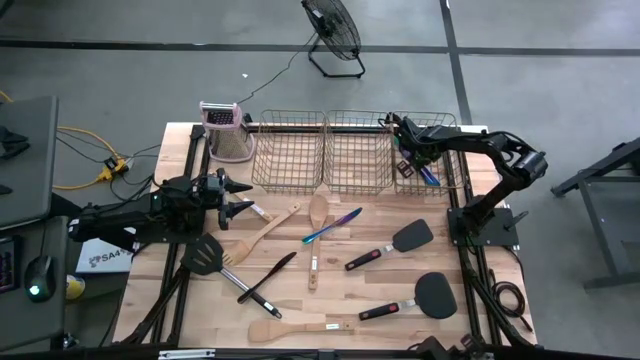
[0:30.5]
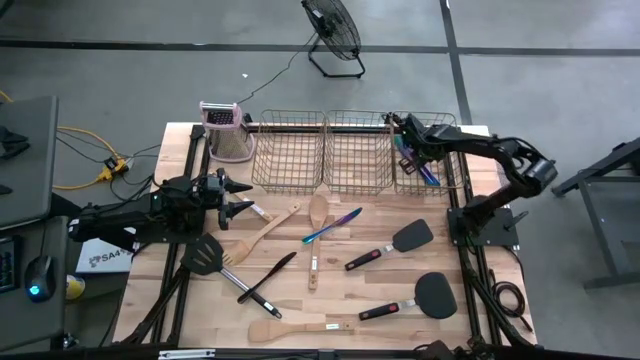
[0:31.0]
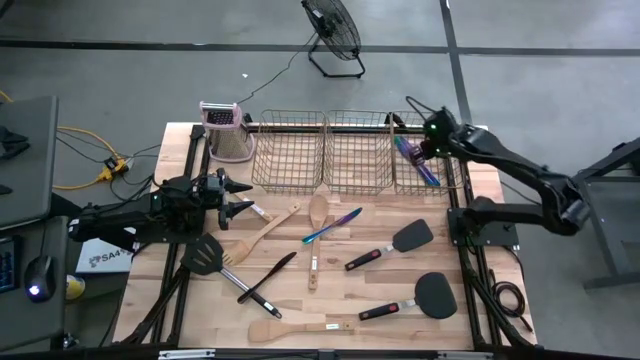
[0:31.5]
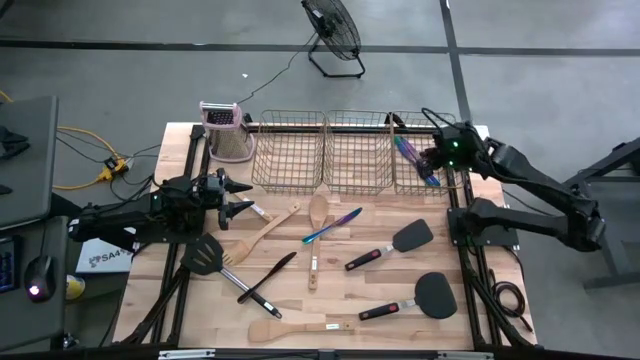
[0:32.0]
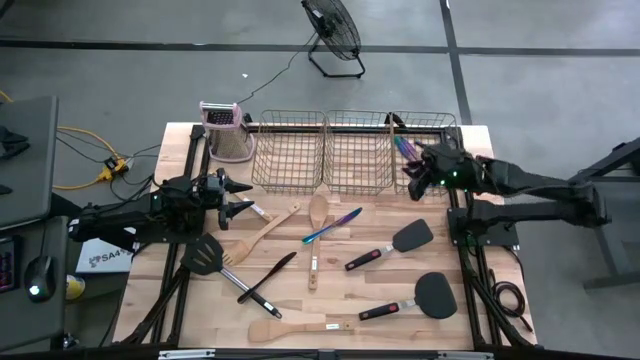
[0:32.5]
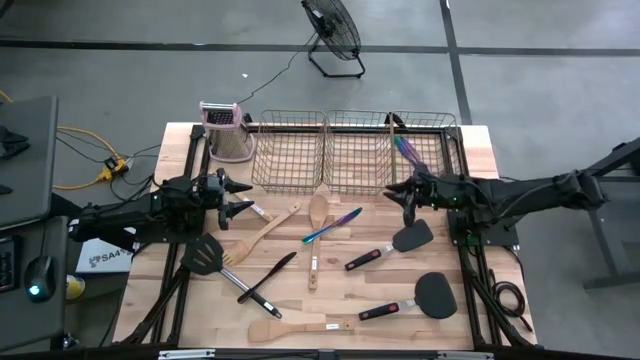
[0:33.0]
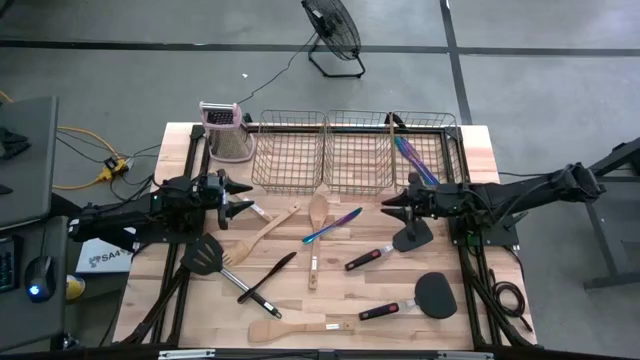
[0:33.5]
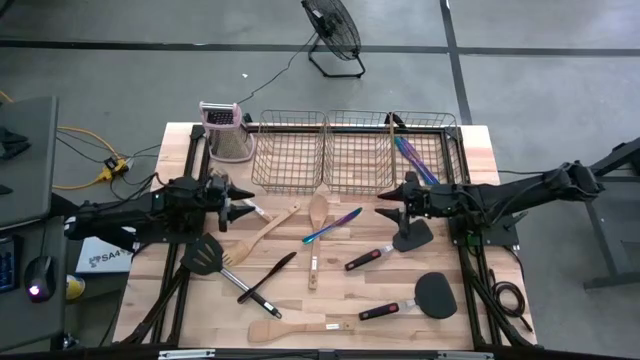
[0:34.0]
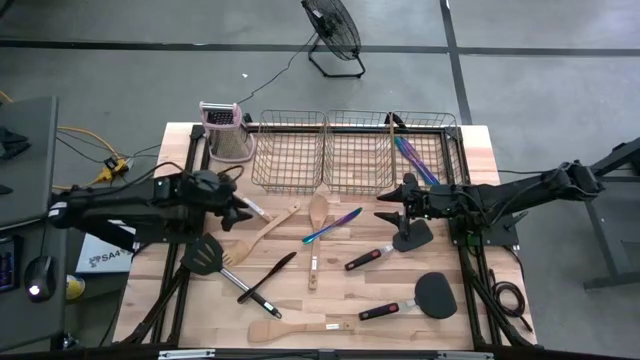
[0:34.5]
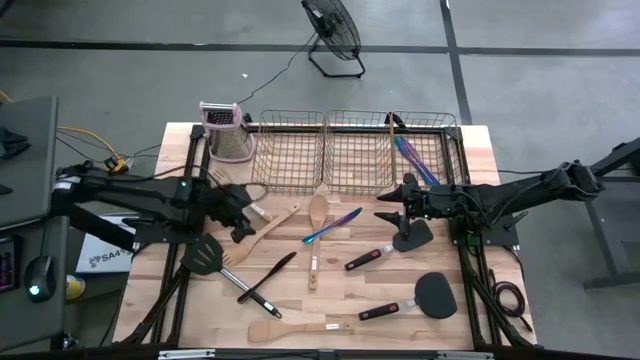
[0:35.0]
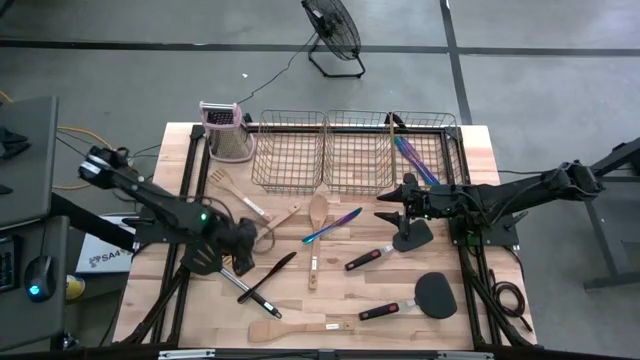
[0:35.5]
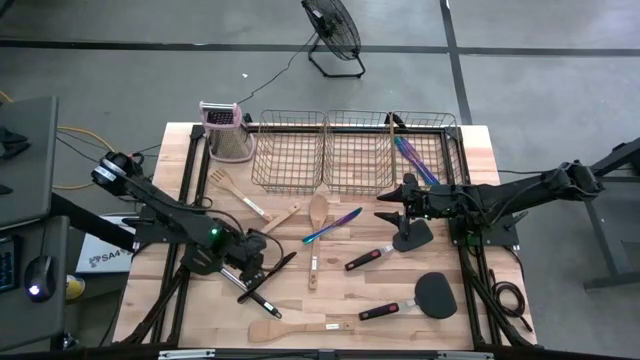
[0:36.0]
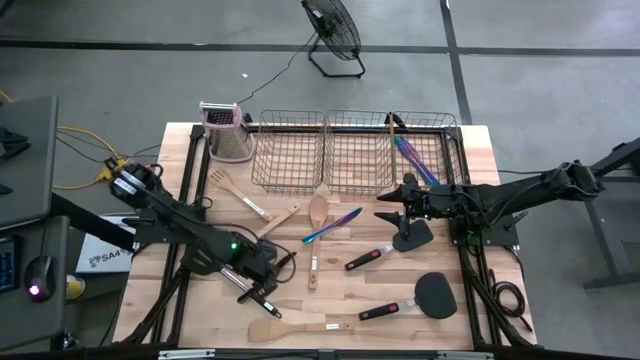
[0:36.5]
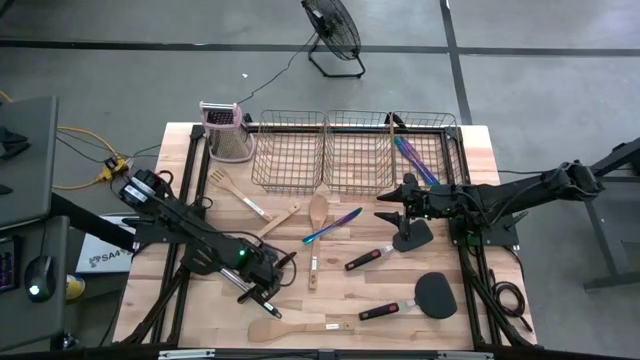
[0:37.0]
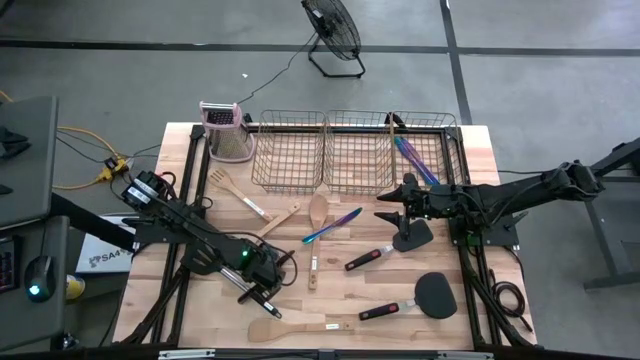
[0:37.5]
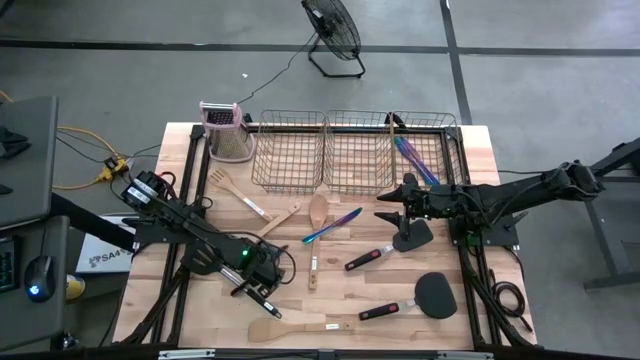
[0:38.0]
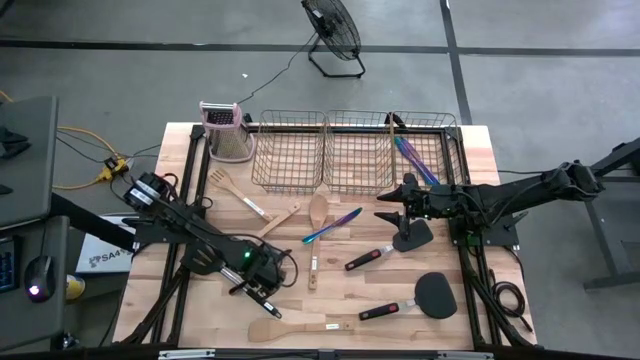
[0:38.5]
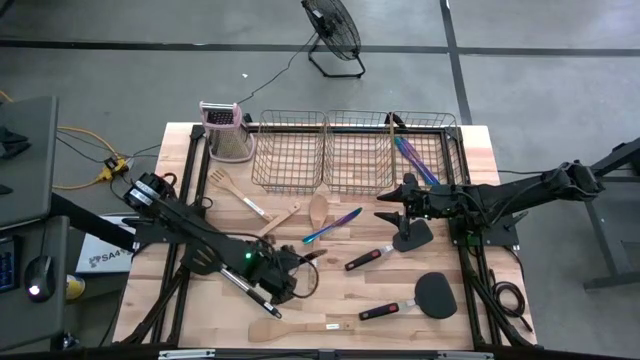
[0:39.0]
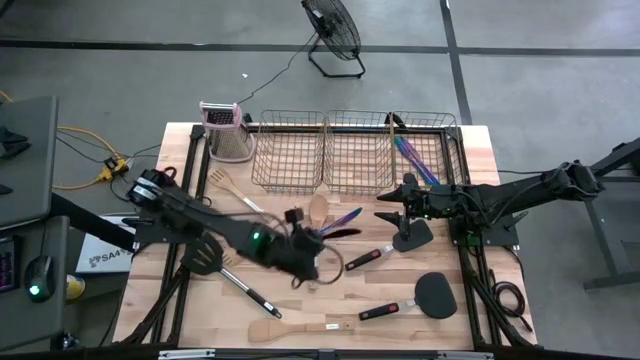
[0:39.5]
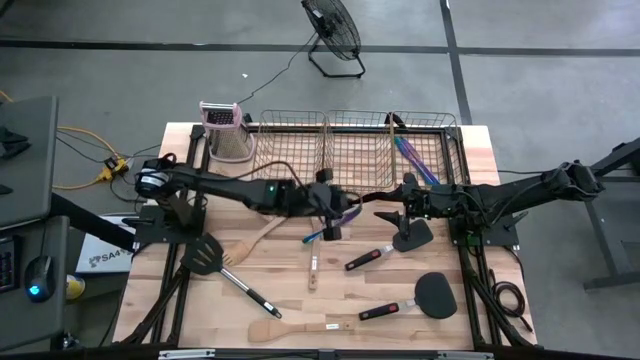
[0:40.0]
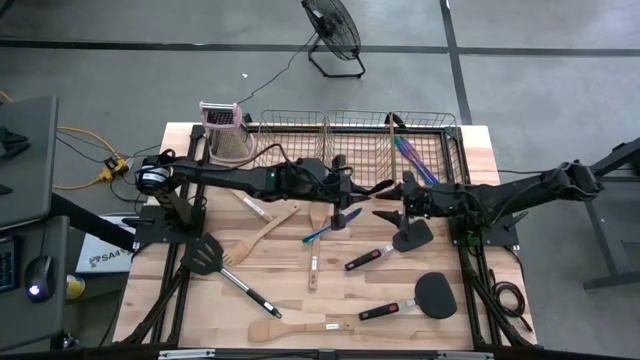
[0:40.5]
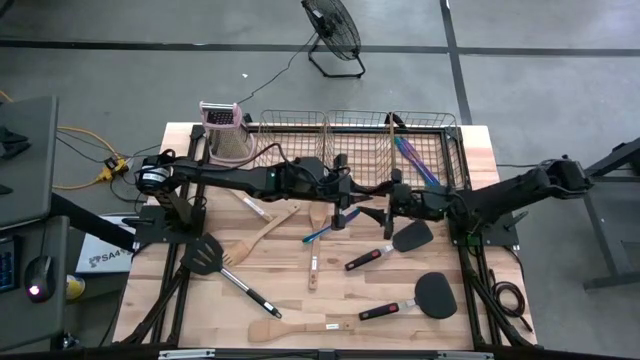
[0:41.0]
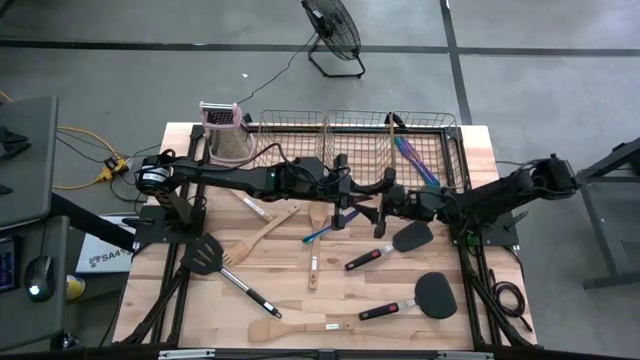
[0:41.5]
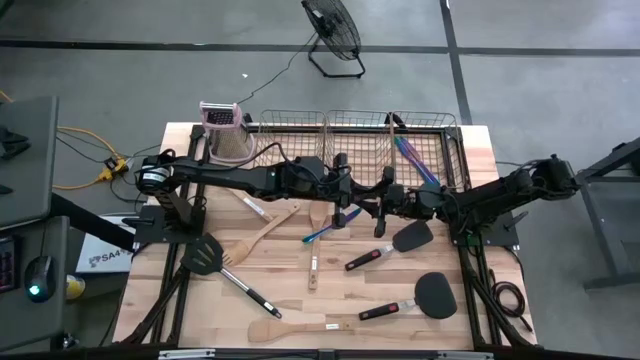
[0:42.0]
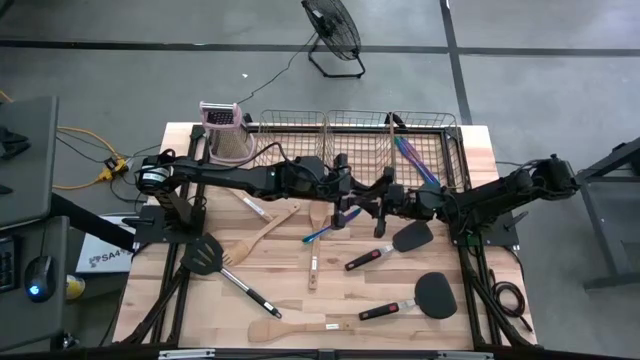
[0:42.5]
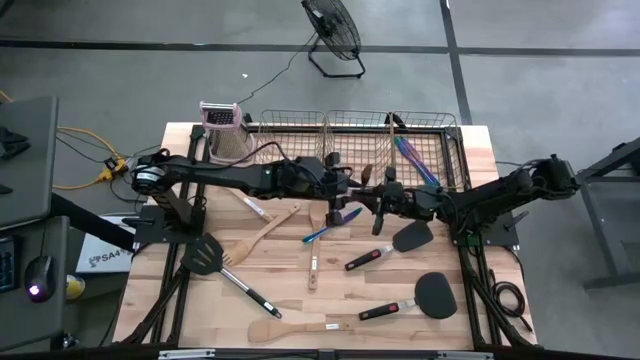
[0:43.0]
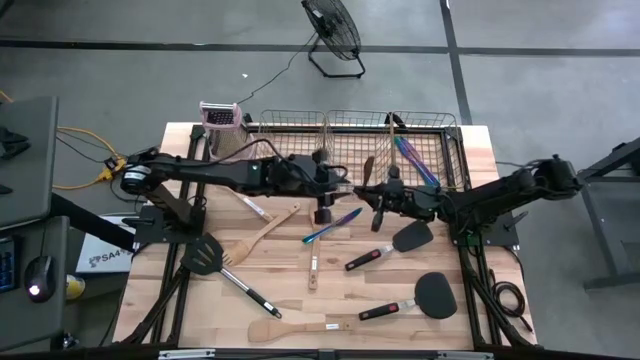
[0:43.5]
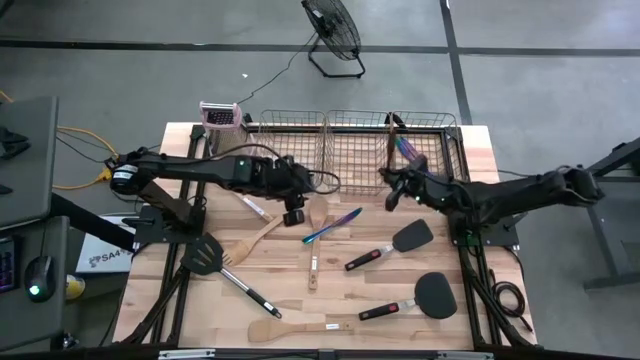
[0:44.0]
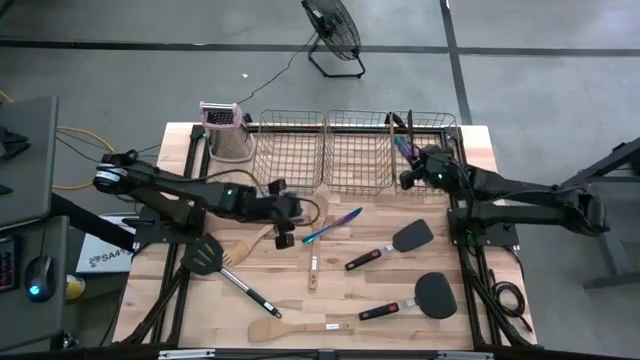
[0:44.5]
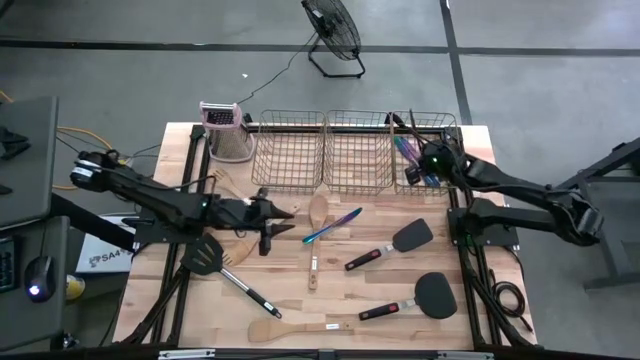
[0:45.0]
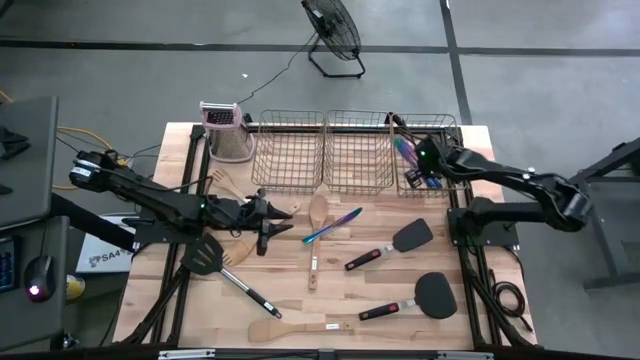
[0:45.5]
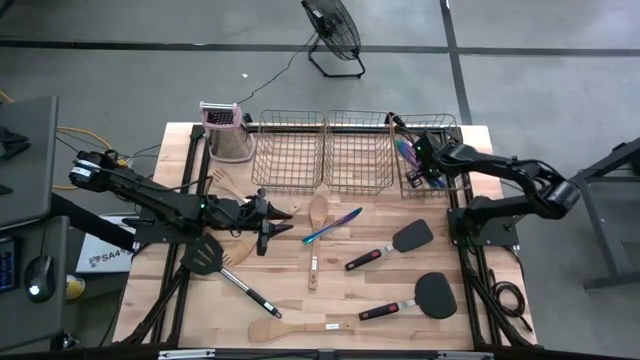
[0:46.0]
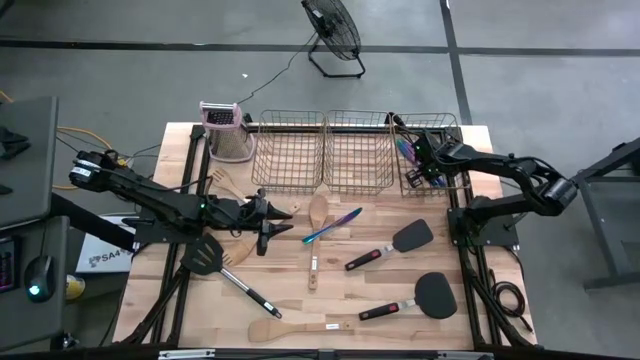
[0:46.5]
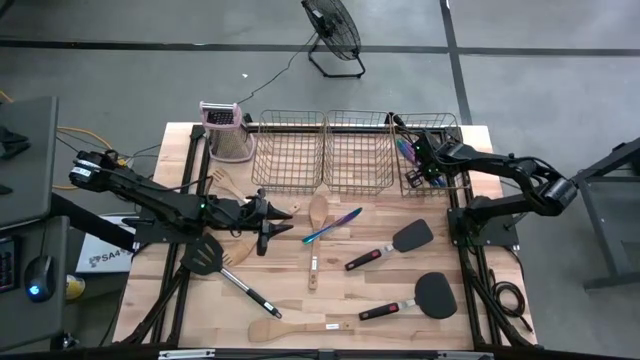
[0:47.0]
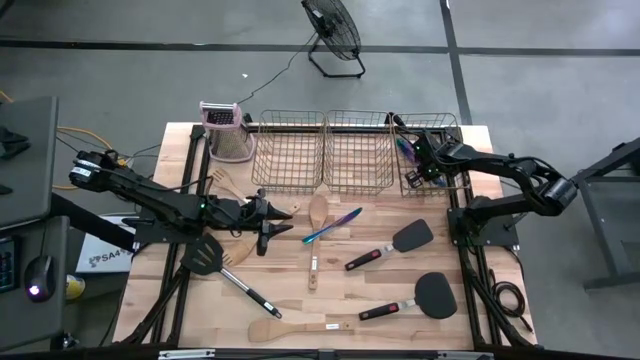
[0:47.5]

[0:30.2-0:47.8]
Task: Pick & Place Kitchen Items
Put the black table knife into the right mesh basket

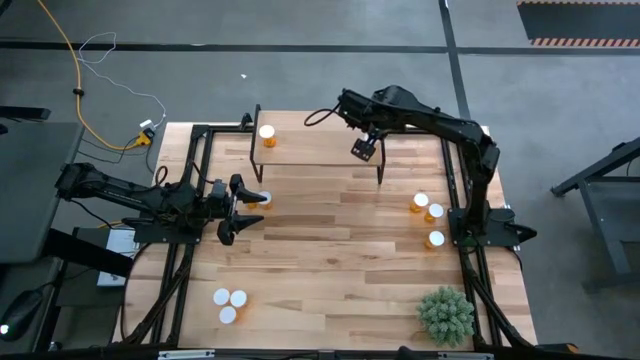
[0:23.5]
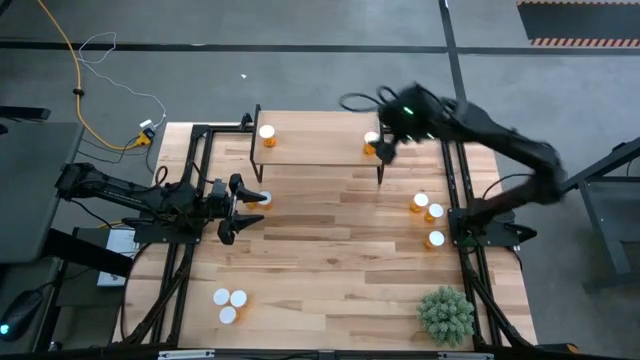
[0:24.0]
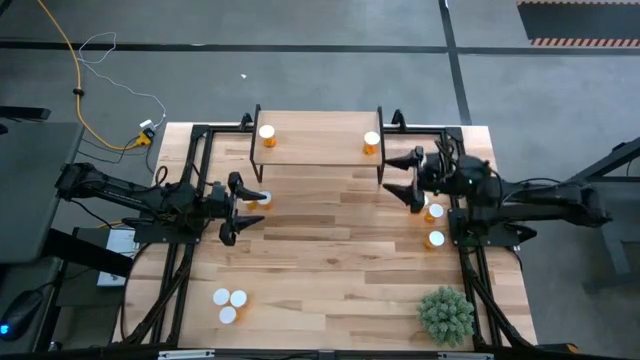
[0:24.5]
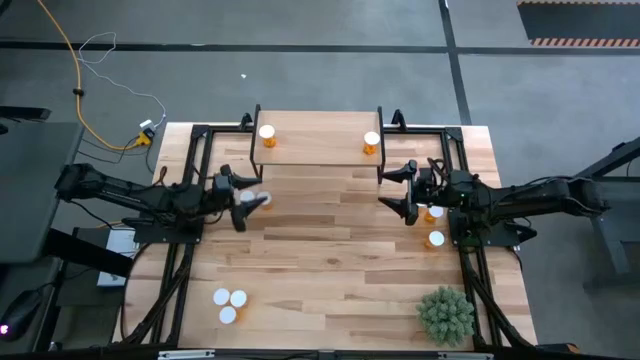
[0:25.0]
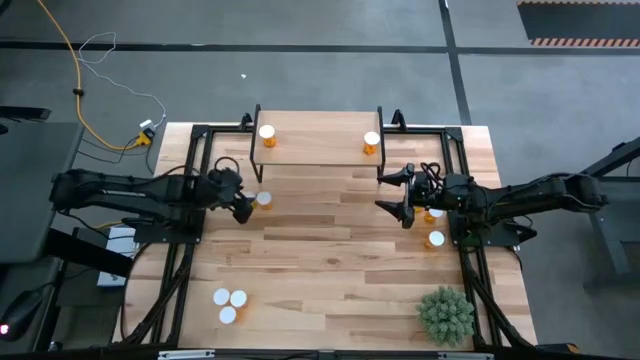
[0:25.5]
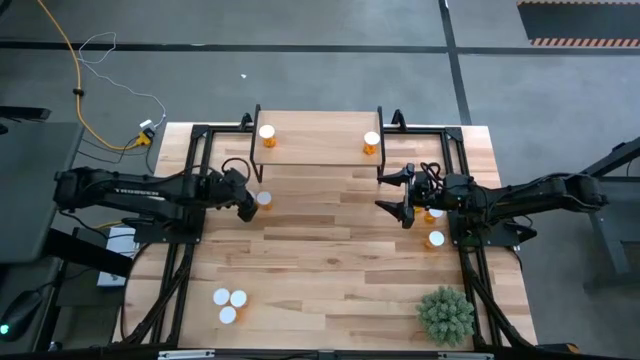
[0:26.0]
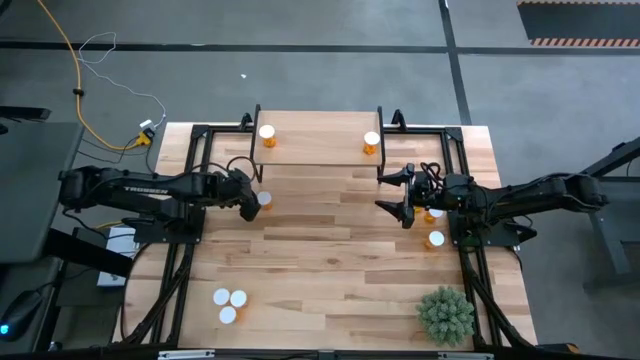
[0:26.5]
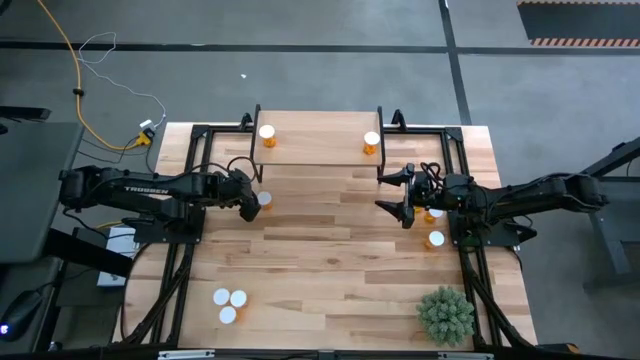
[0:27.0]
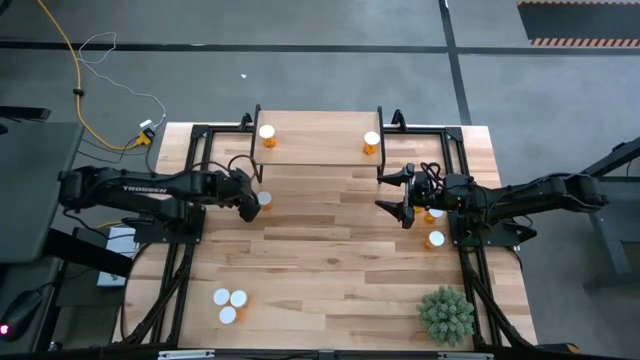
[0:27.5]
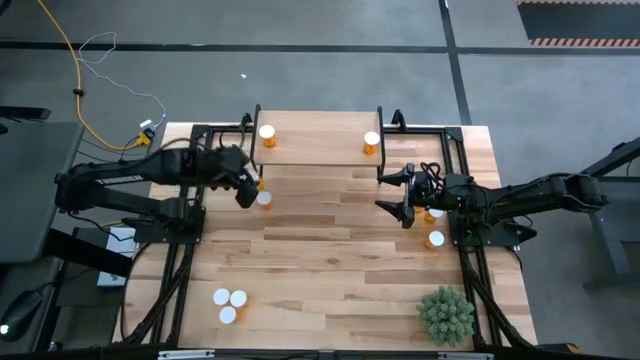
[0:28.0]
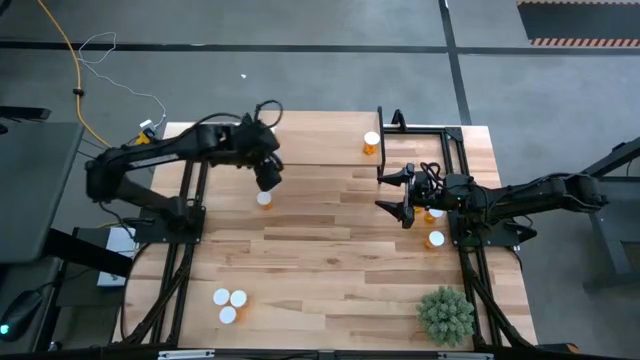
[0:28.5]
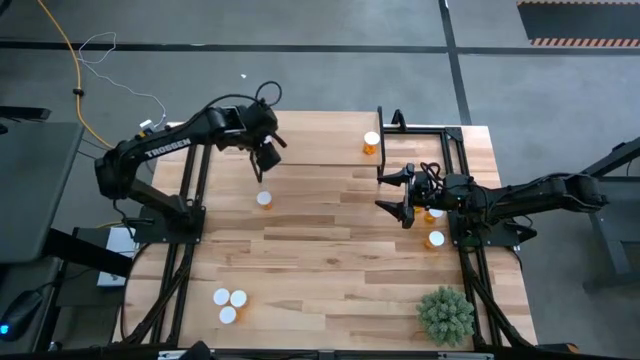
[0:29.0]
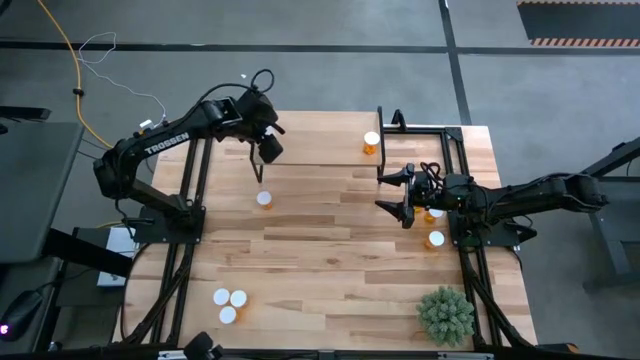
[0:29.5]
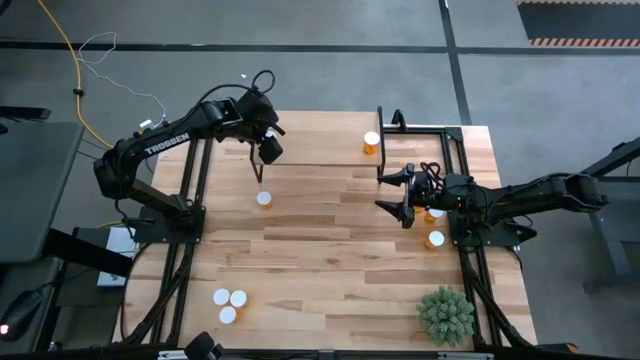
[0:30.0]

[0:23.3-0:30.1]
Task: Pick and place medicine bottles onto shelf by color
Put the orange pill bottle on the shelf
